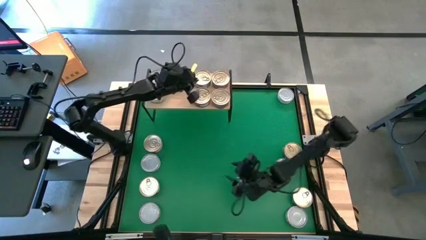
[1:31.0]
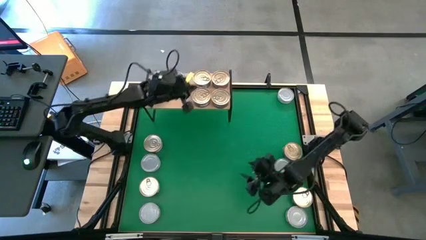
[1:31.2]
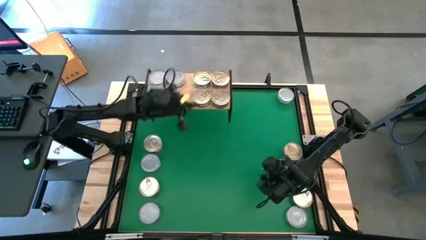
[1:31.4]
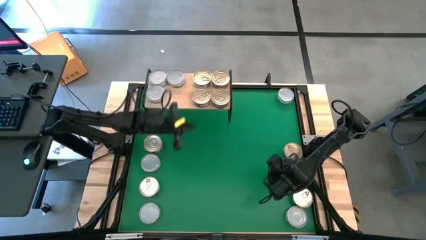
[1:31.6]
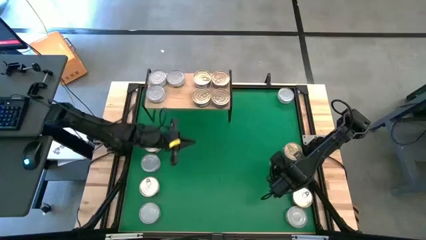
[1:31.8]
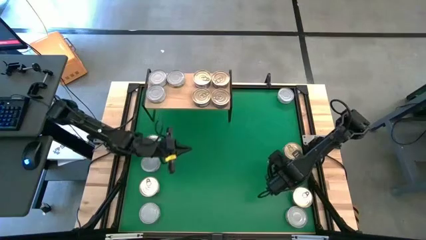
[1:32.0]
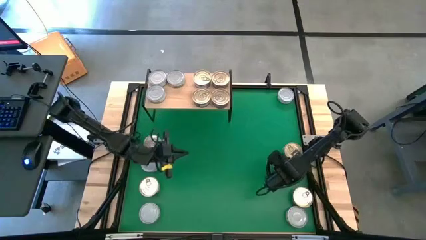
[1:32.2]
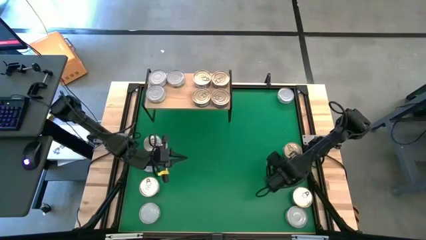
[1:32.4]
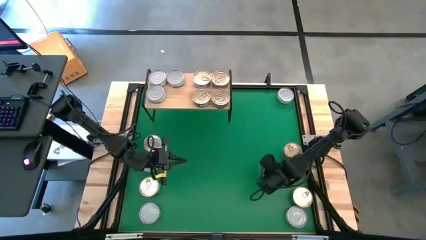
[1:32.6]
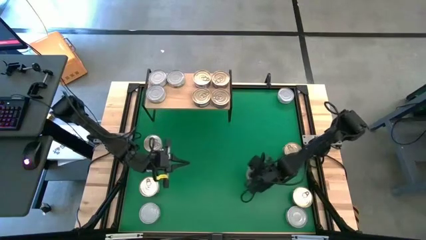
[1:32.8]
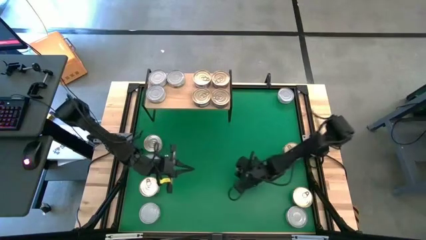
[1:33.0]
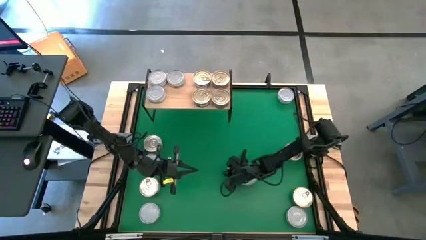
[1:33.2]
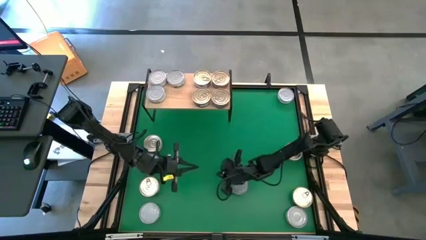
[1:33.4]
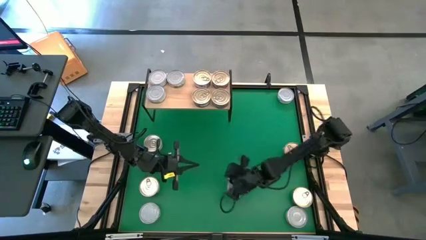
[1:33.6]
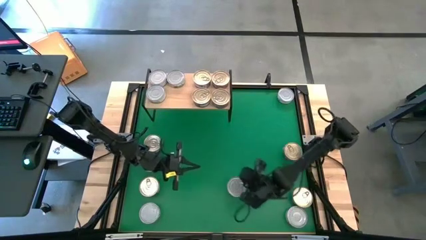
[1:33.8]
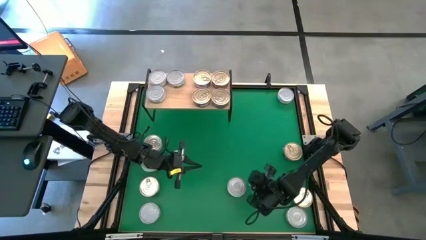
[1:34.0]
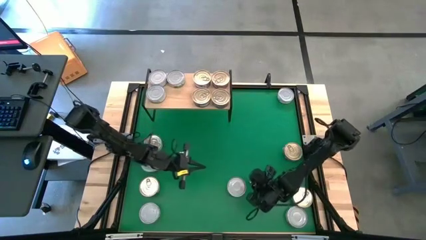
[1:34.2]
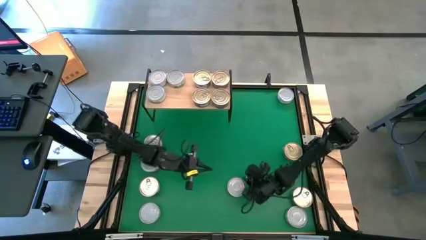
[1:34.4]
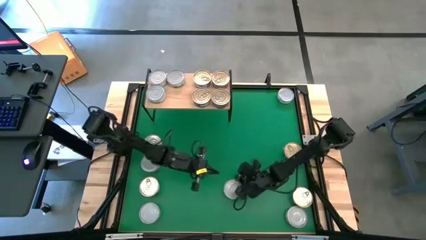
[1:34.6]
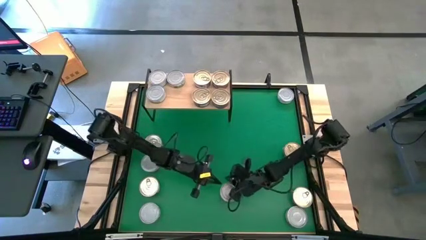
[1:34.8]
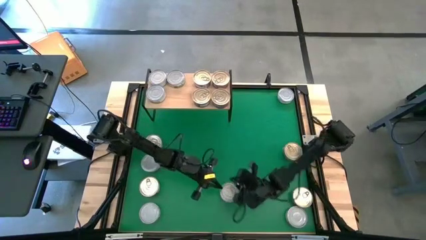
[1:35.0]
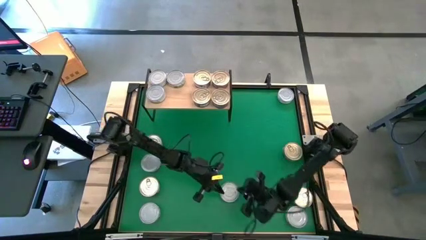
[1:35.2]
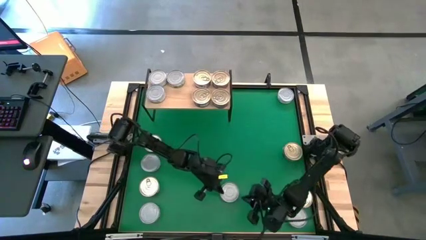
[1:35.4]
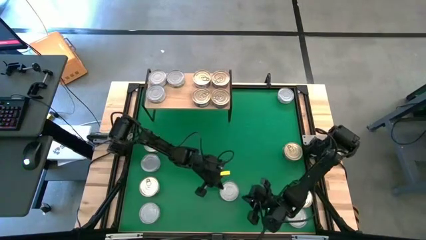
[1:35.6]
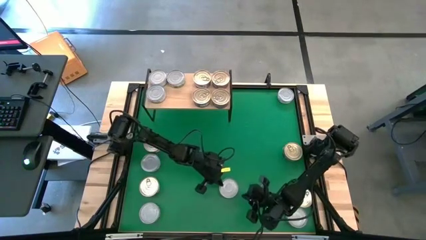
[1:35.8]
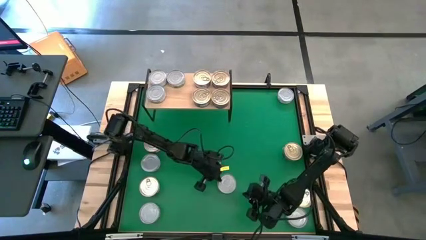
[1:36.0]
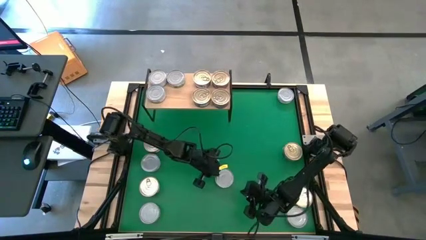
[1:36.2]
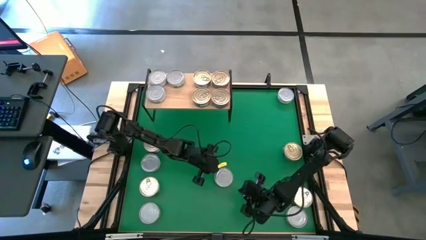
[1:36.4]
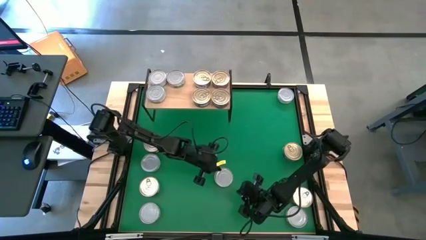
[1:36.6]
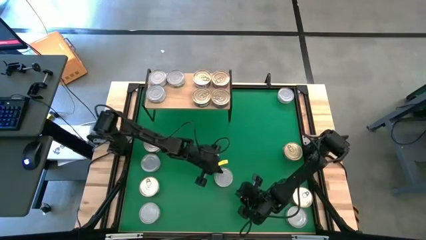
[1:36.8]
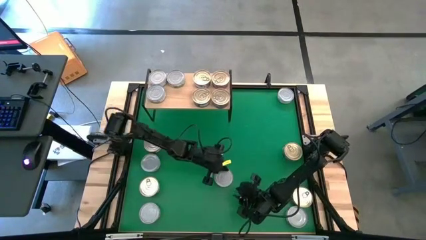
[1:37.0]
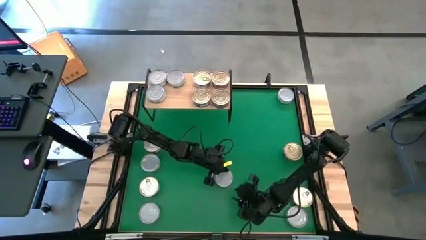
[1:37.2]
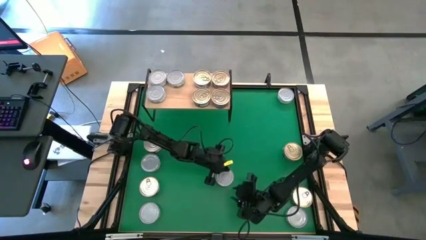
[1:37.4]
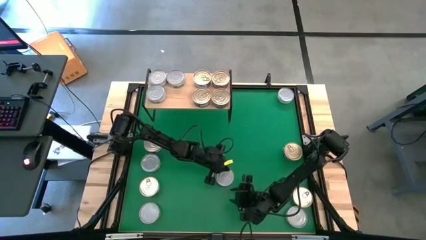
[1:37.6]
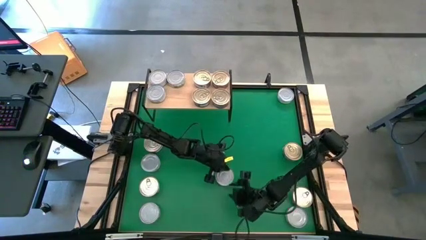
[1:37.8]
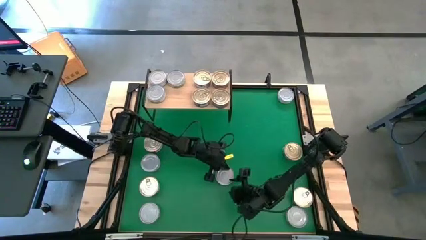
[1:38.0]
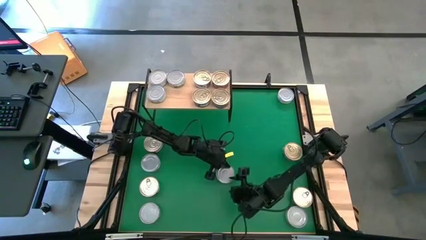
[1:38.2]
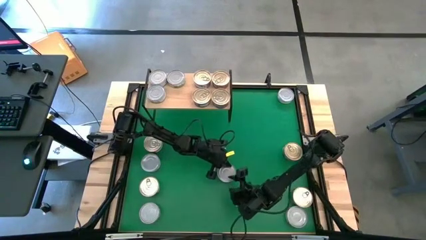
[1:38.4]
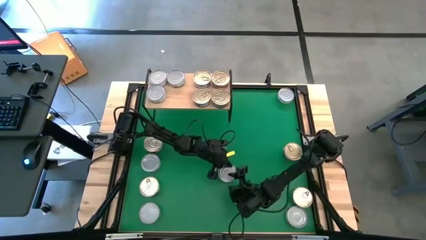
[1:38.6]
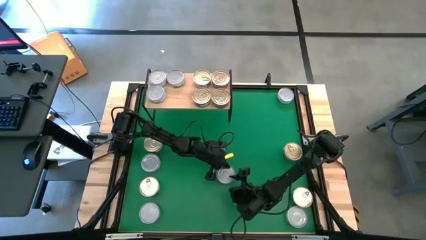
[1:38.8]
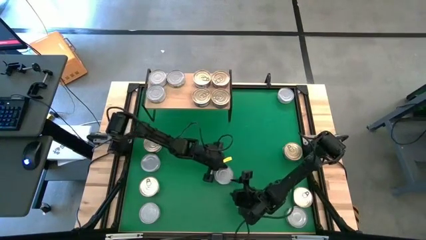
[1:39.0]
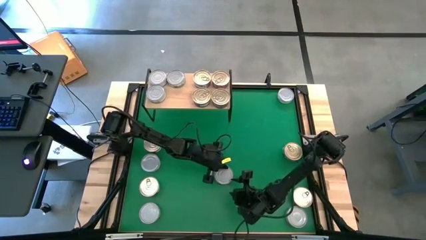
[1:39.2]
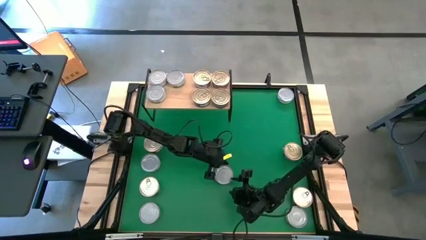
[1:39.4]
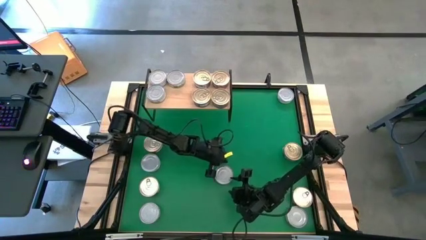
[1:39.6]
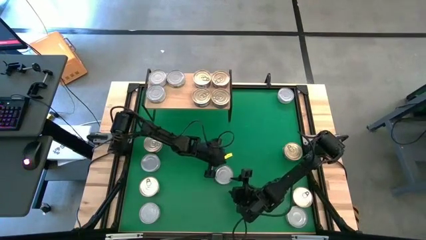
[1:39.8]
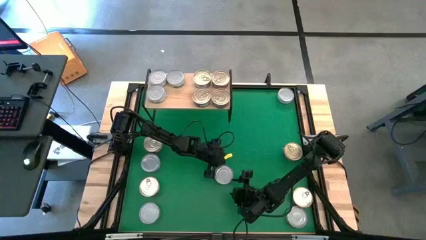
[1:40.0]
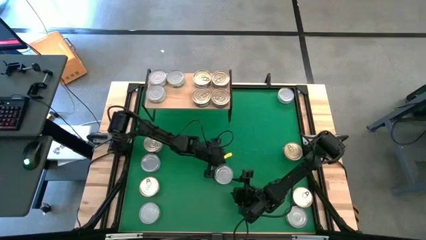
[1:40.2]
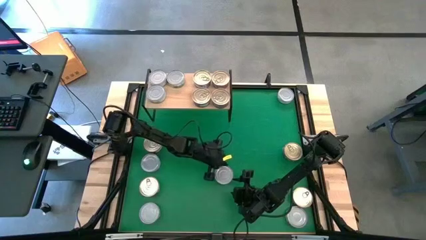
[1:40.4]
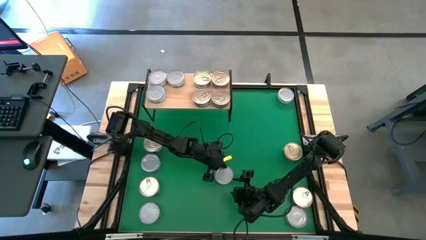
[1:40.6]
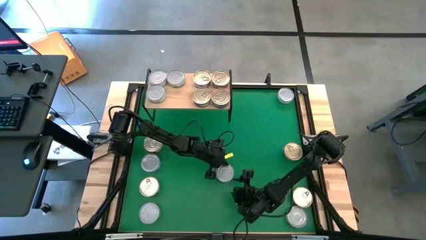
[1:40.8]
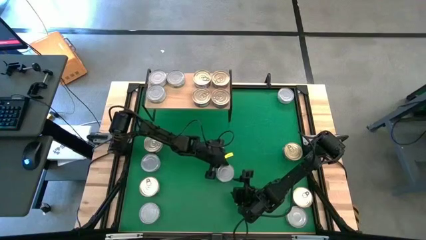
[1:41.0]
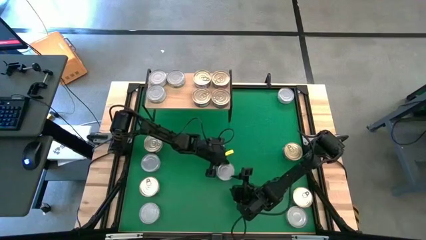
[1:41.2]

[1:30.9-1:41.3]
Task: Stack canned seafood by type on shelf
Put the green tuna can on the shelf
